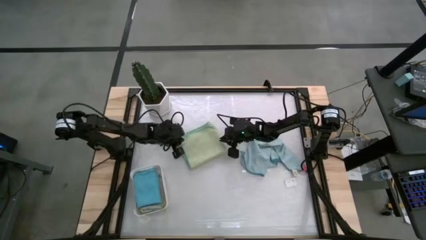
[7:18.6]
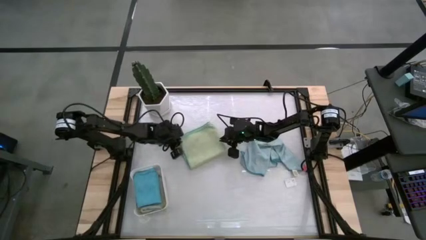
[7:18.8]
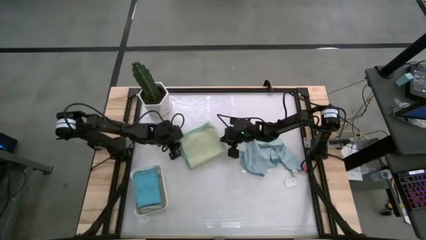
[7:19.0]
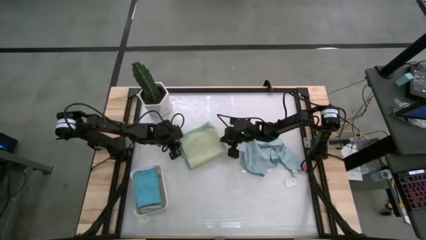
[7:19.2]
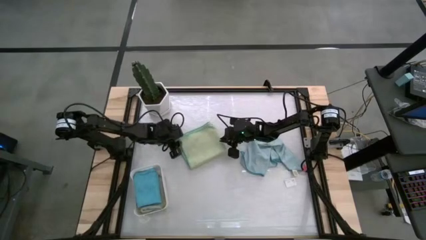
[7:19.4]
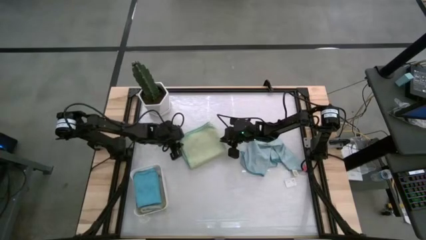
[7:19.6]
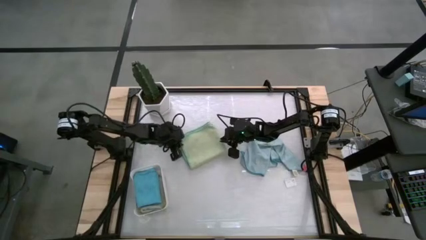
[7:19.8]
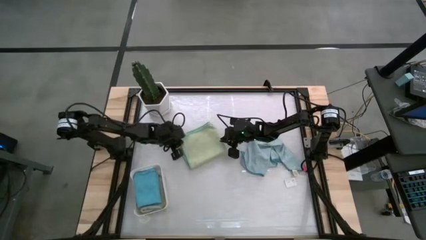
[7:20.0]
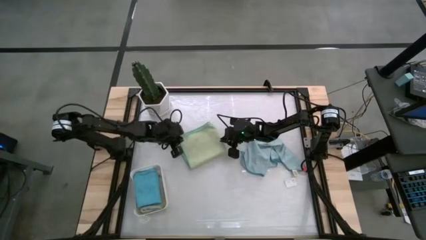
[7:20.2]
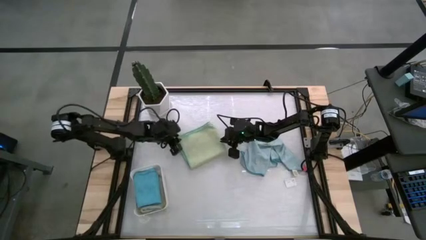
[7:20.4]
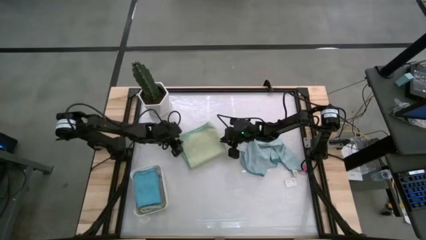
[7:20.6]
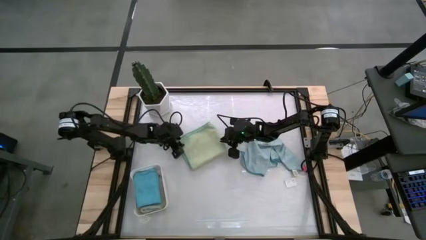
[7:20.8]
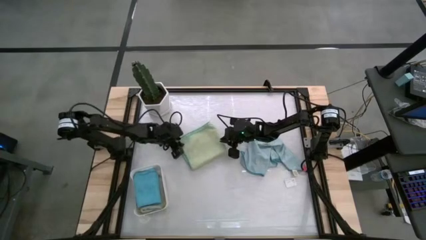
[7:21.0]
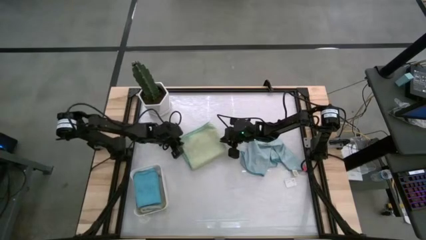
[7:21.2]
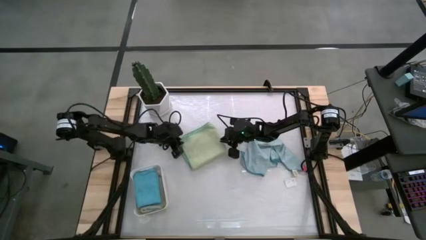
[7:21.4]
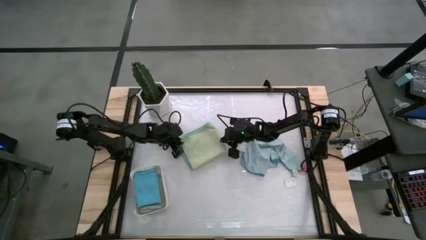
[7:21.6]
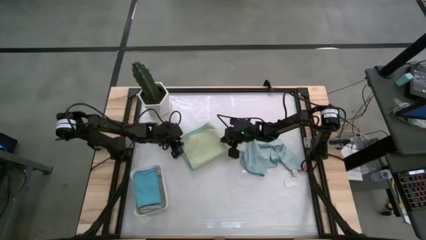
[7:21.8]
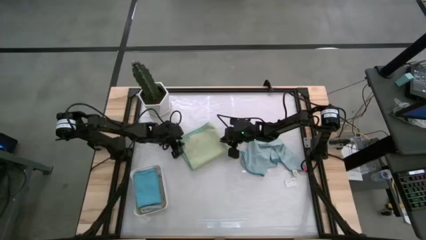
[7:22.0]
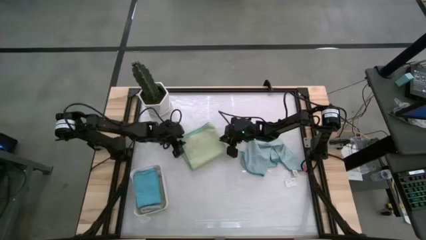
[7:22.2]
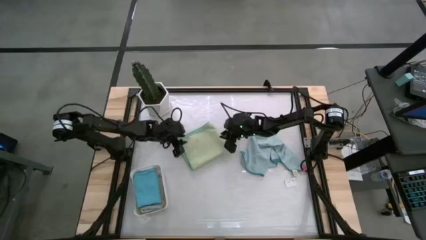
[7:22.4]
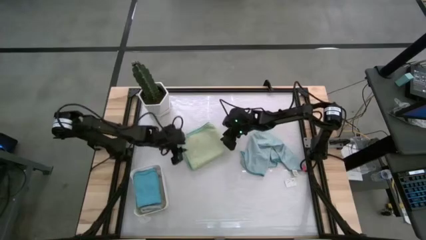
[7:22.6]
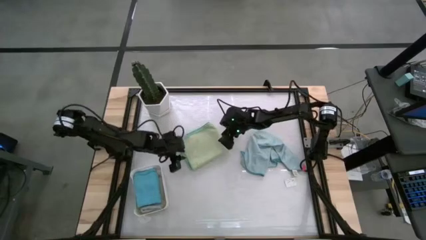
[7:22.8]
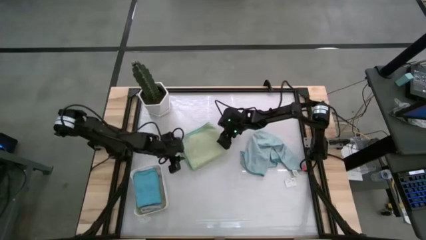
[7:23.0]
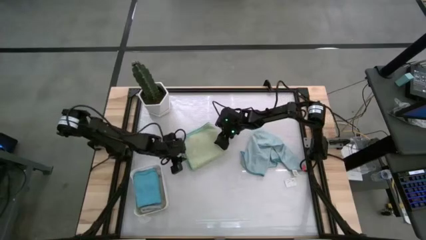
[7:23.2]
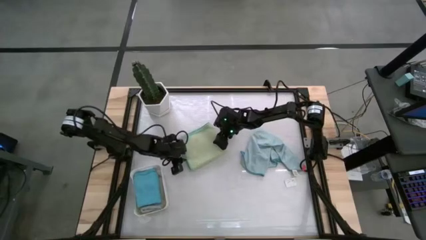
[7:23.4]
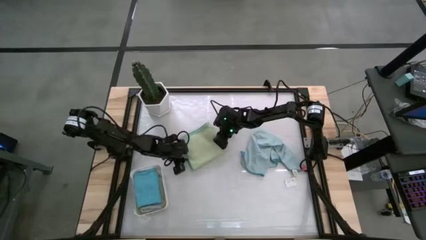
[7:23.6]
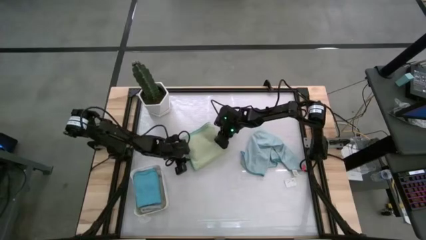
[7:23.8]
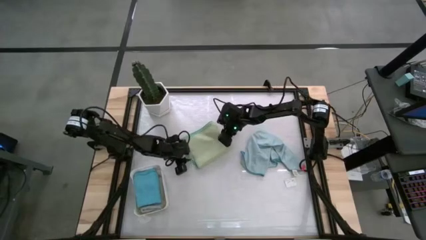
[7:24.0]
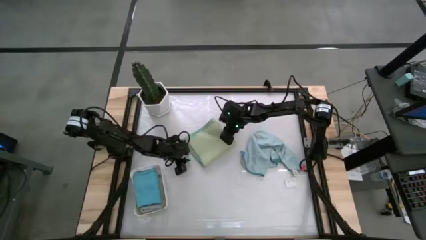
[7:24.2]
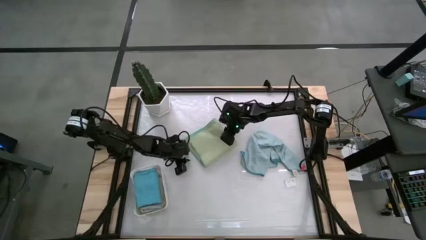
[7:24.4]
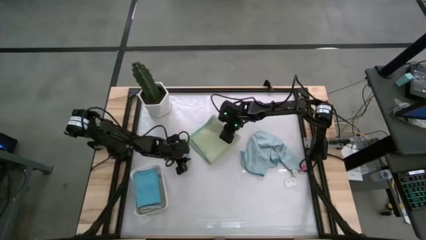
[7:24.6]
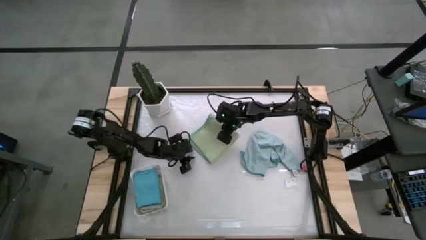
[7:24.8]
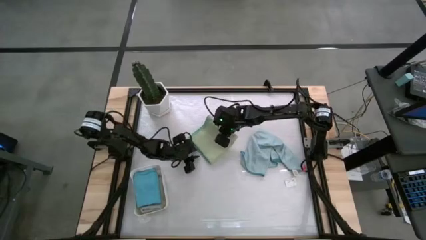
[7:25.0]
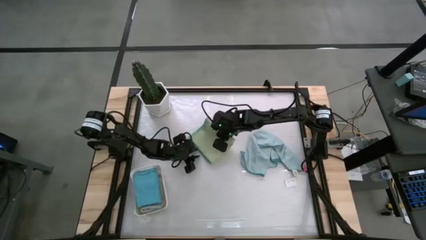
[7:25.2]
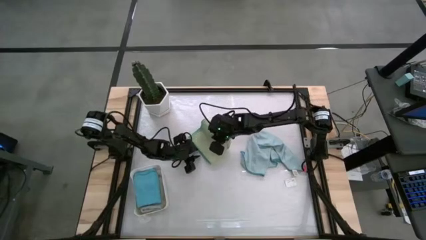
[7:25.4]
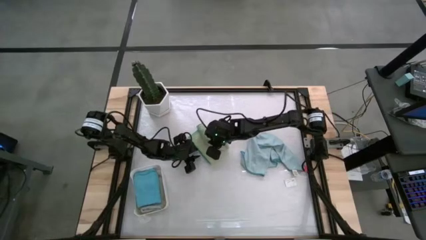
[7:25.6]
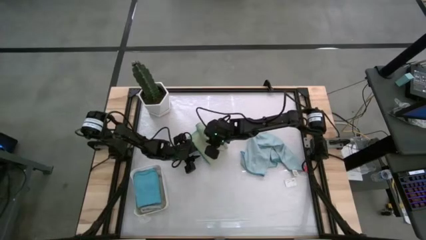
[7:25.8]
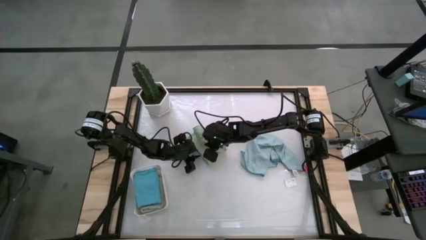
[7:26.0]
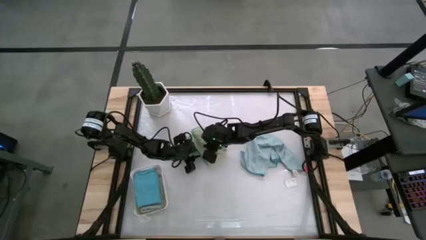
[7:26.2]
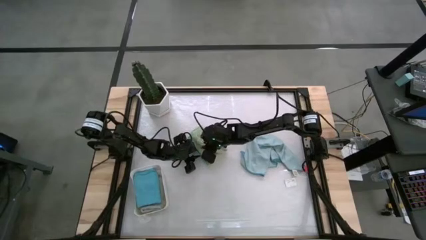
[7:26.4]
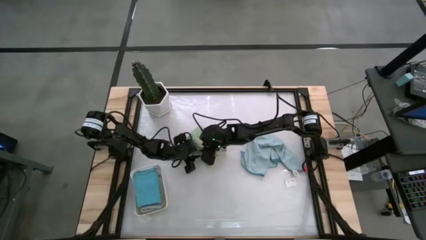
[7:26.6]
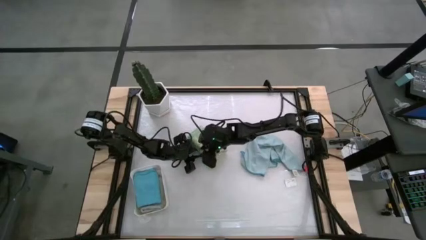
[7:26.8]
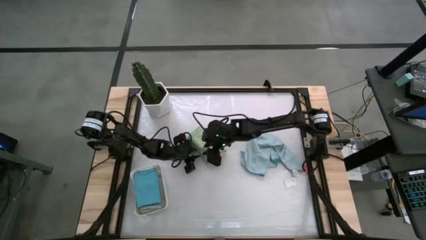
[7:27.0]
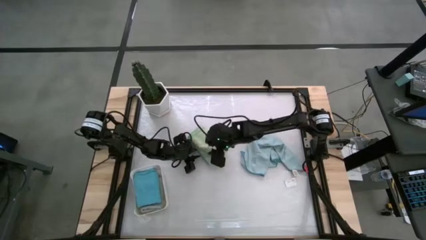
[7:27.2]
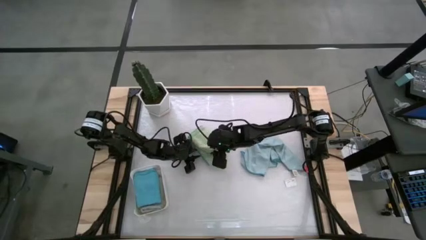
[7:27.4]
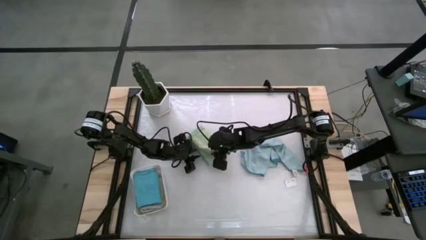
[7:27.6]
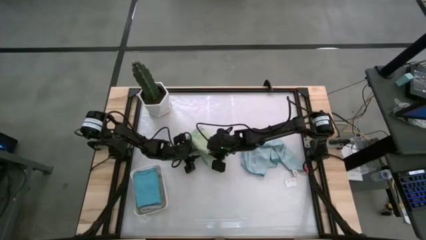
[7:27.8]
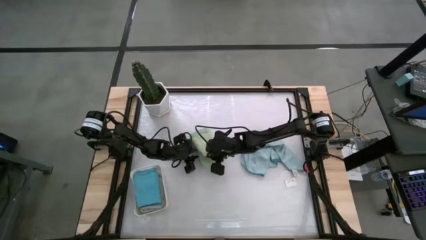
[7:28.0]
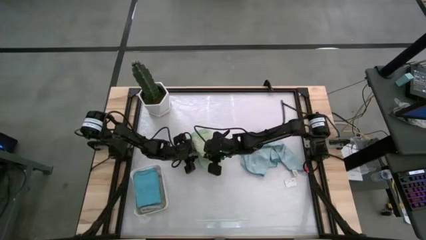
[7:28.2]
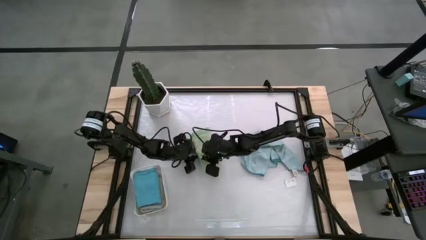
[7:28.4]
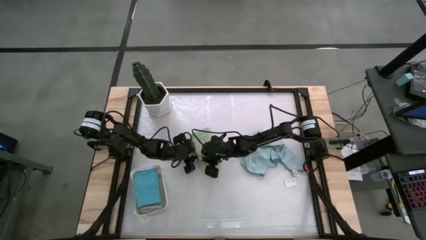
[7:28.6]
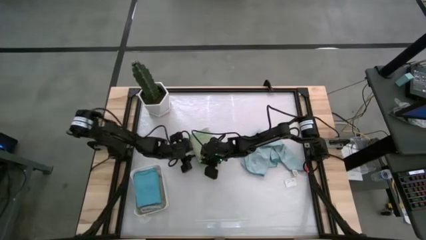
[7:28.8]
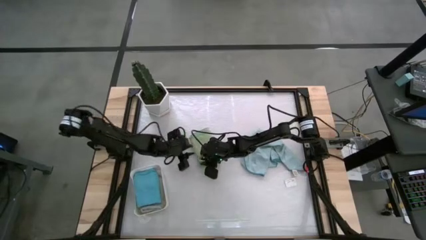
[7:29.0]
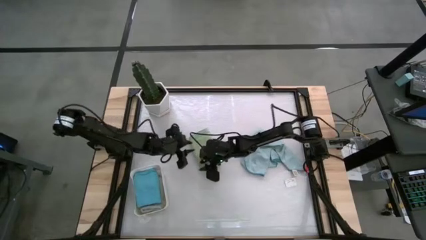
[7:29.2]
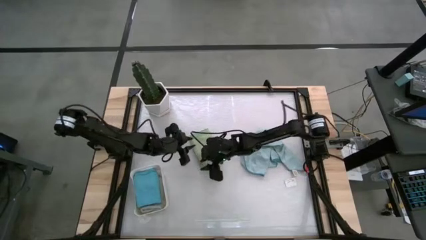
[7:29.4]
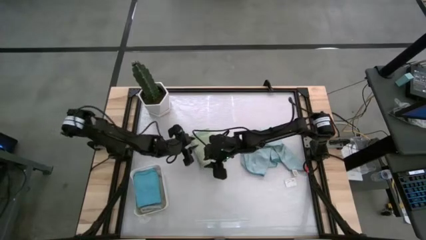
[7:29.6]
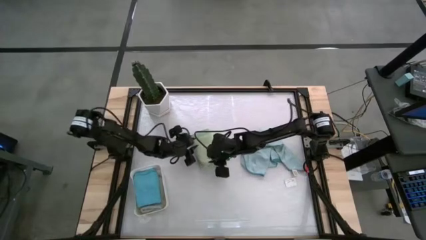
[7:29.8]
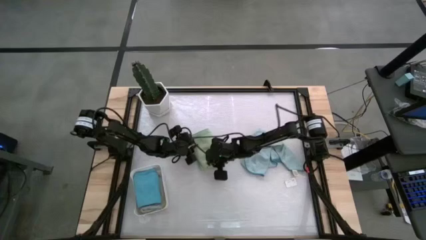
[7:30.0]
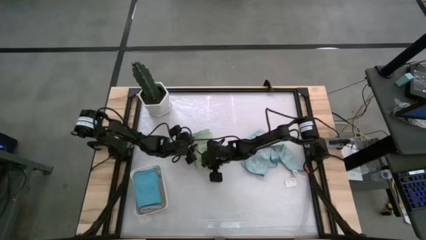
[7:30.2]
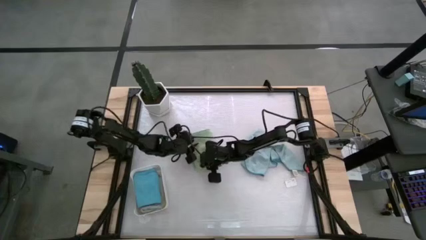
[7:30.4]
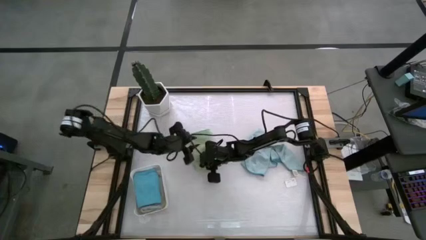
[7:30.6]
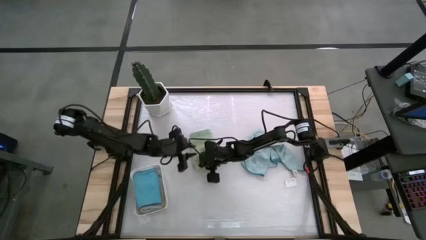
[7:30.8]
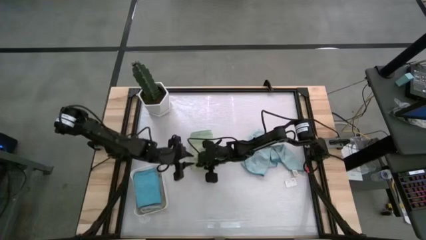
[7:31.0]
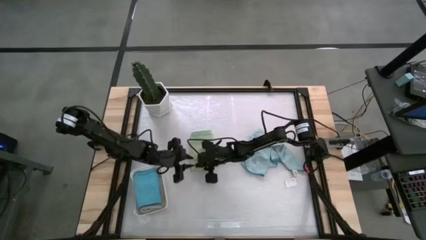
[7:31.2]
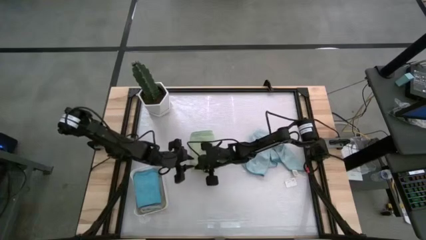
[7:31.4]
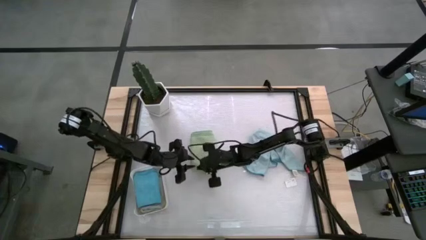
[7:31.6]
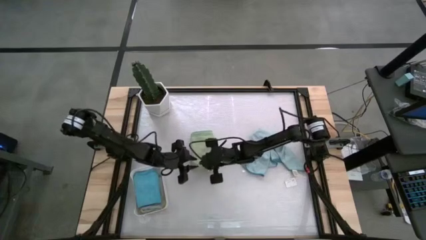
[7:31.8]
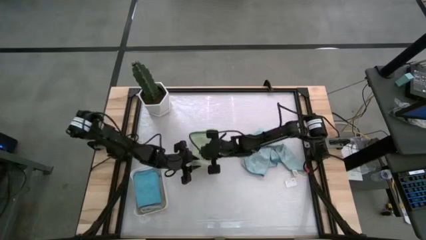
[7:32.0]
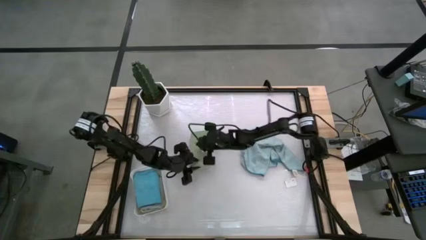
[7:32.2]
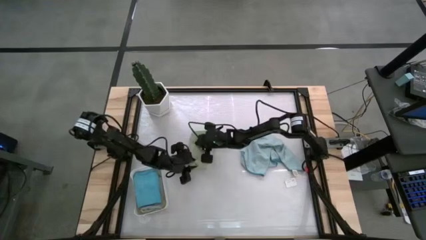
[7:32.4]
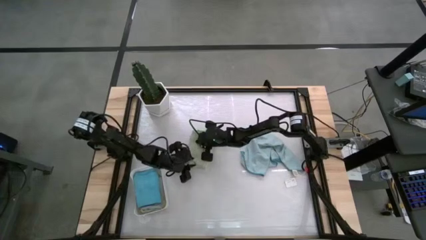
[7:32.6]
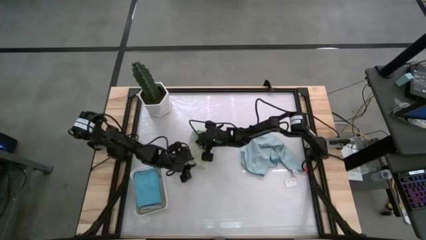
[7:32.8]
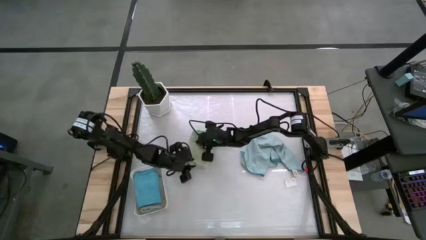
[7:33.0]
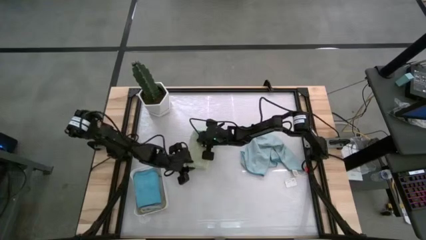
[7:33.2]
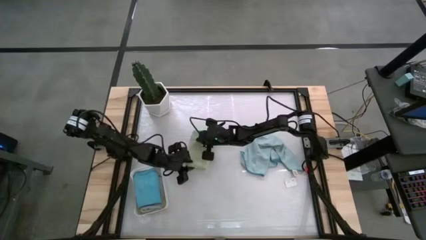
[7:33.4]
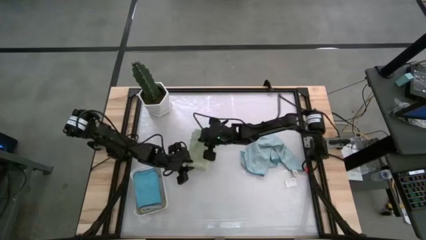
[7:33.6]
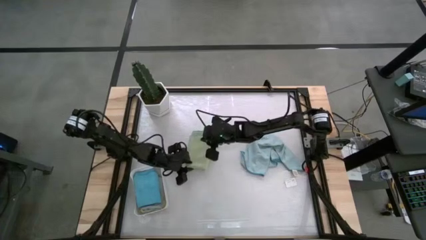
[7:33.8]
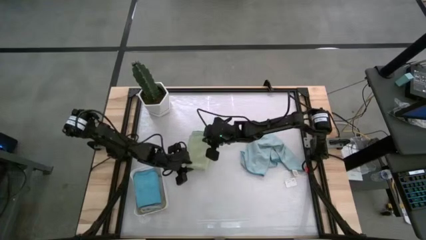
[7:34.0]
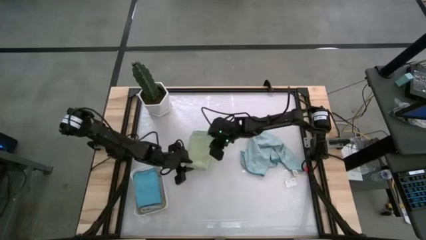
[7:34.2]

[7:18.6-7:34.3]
Task: Fold microfiber towels
Fold the green microfiber towel
